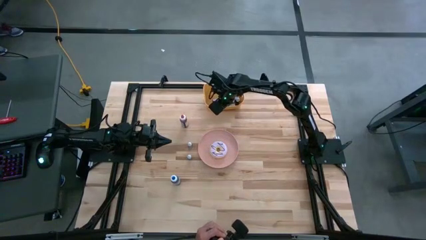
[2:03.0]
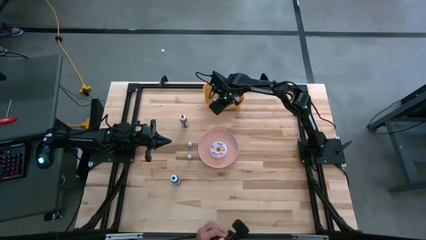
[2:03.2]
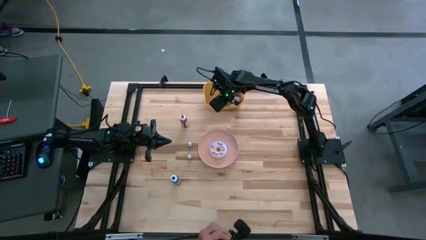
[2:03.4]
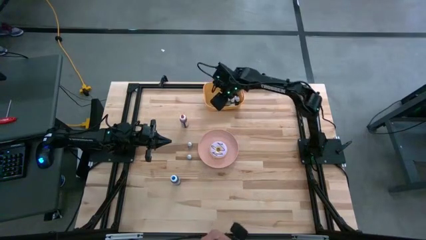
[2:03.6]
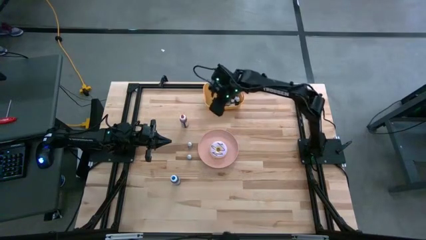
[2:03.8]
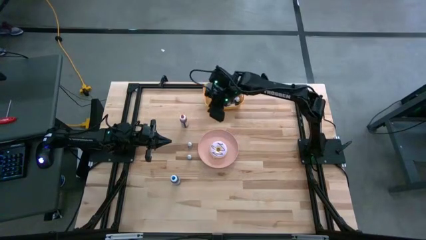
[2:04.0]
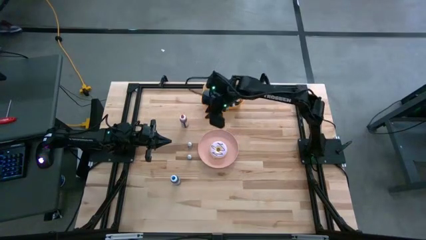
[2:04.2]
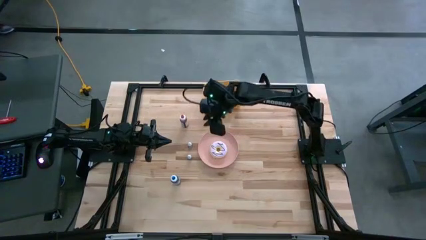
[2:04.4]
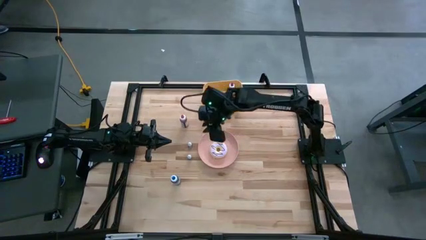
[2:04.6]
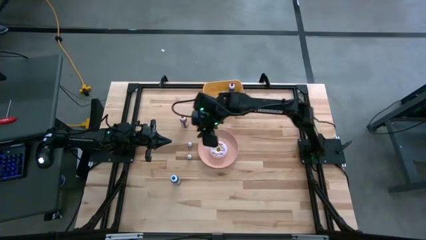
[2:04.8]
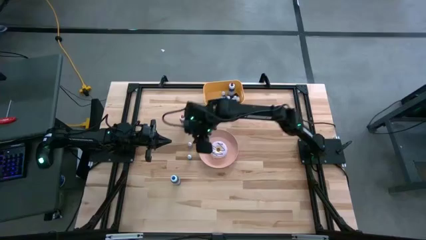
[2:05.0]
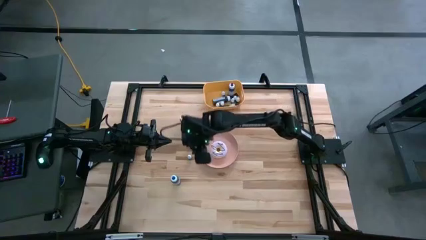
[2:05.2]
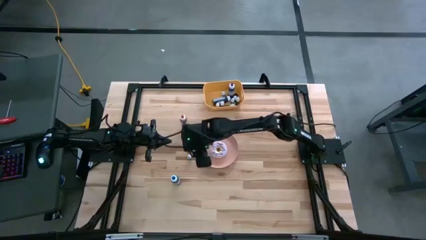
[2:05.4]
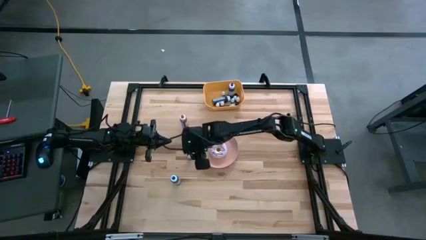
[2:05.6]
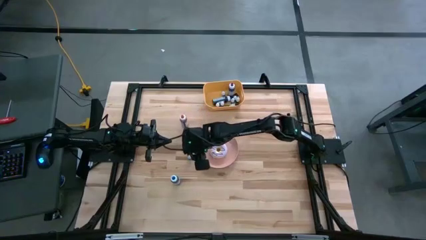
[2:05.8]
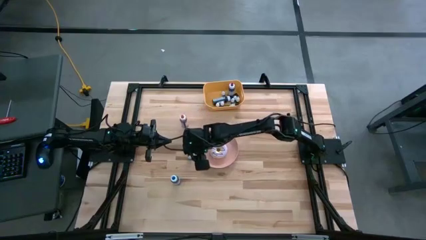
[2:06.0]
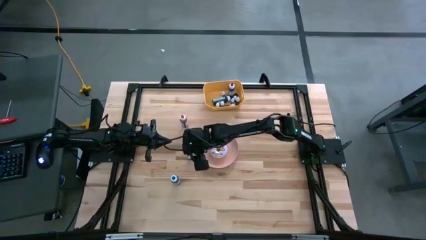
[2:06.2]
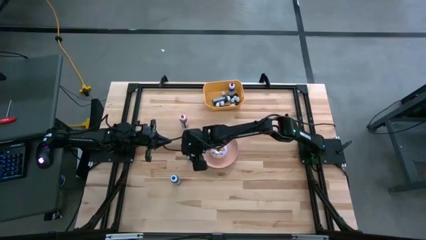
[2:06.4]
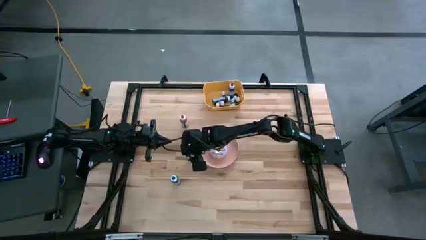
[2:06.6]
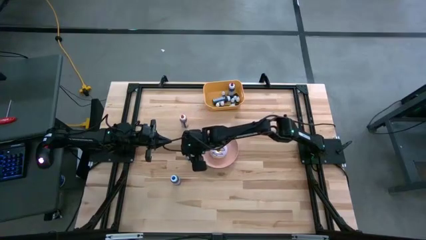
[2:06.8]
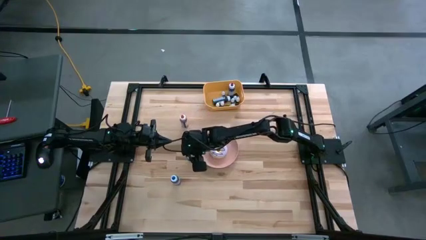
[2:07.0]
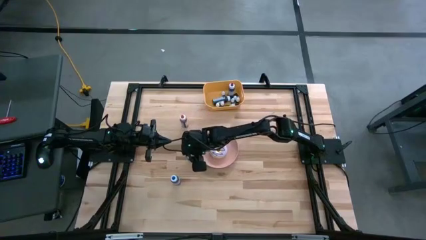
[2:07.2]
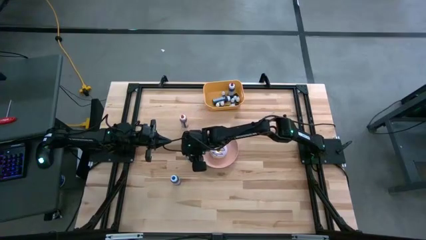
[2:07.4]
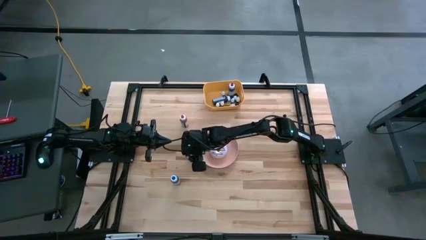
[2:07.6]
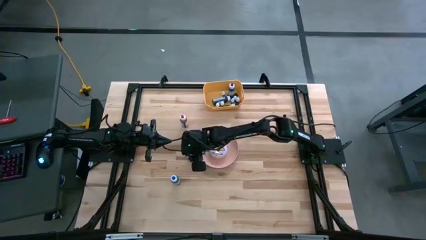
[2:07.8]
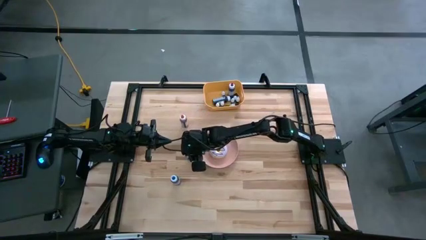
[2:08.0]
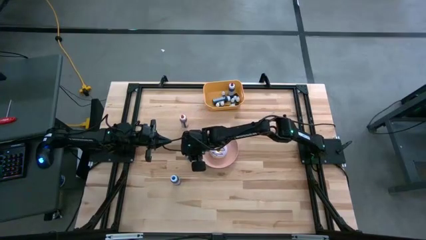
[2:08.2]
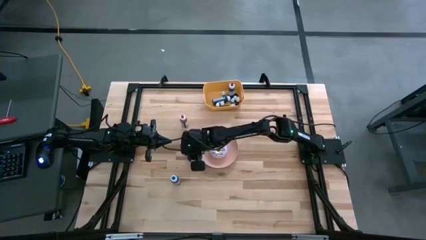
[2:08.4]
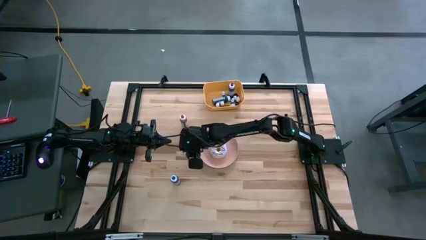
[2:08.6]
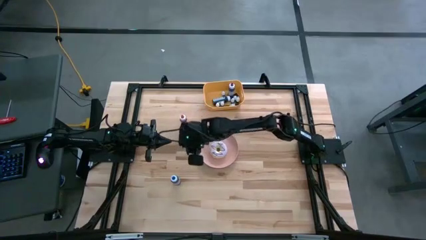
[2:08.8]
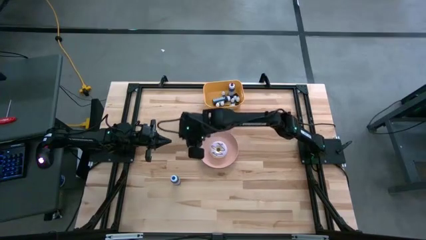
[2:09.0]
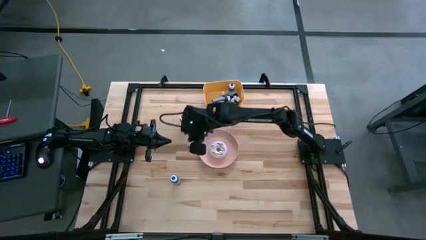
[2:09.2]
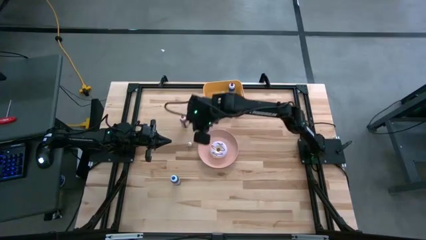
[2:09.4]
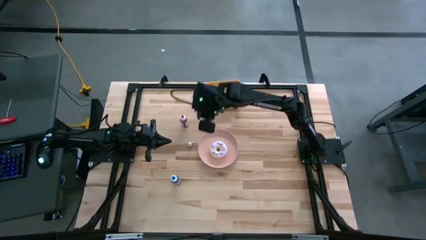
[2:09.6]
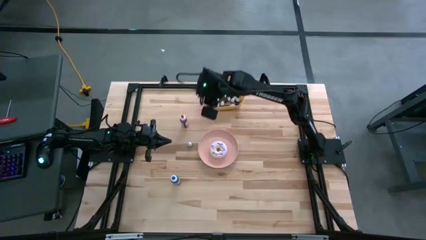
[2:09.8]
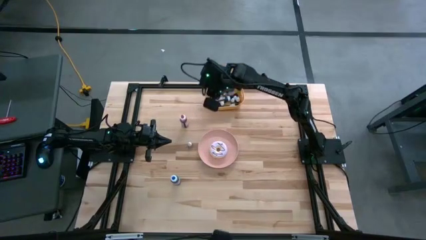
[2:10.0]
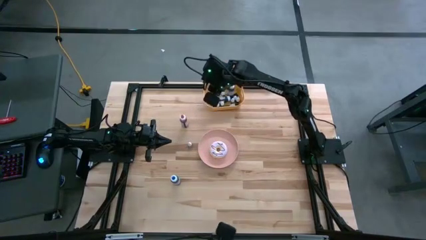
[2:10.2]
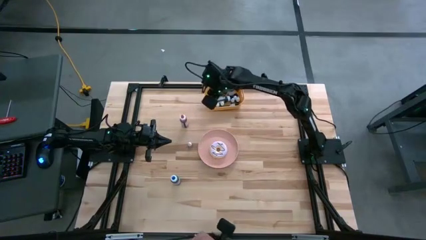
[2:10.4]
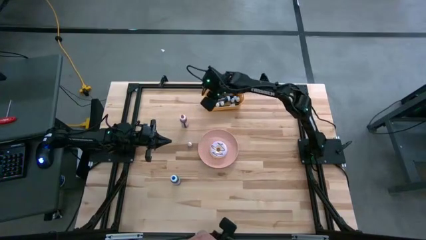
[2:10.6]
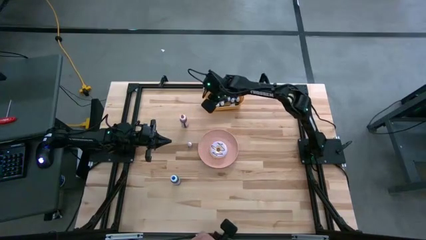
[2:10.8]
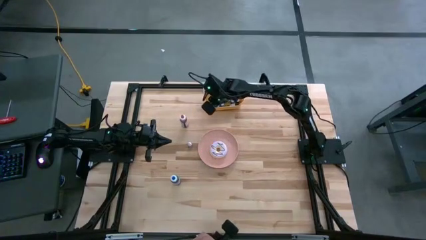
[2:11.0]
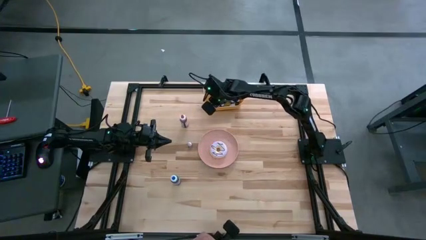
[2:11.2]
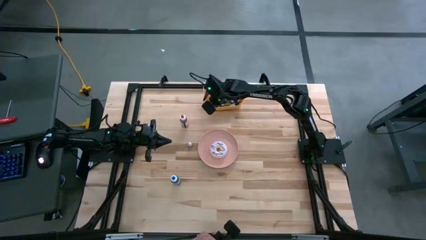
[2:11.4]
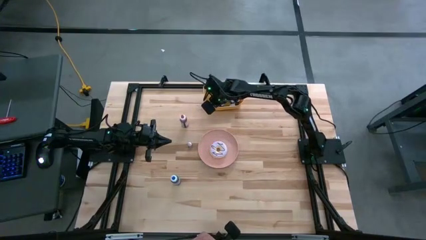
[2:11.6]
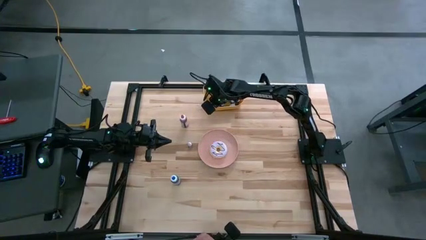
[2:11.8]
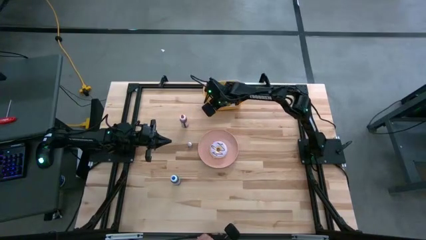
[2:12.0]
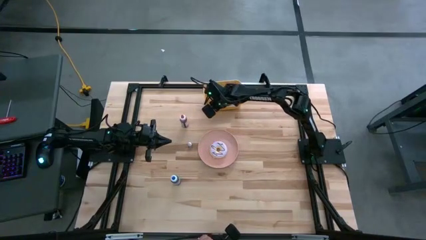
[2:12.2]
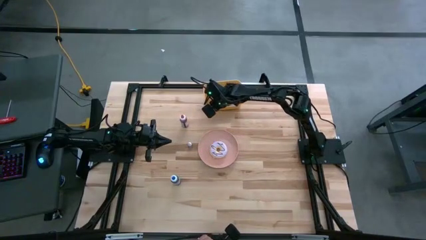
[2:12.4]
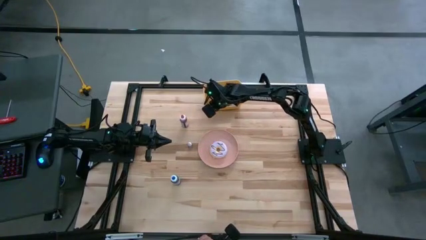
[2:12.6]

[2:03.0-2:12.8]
Task: Pick & Place food coloring
Put the small blue food coloring bottle into the orange bin

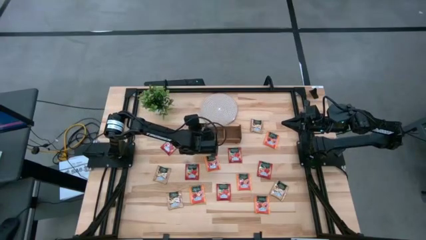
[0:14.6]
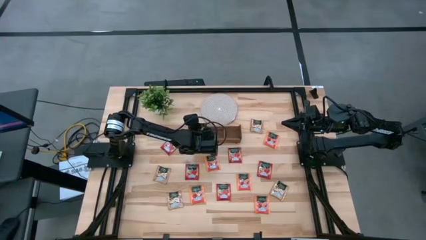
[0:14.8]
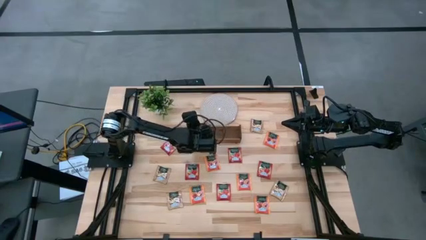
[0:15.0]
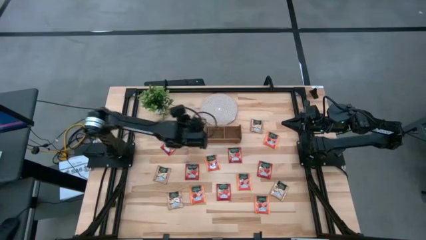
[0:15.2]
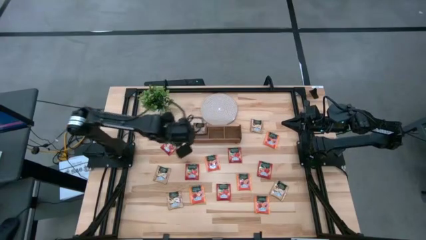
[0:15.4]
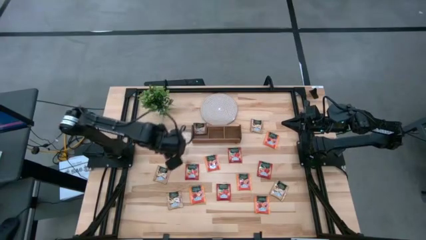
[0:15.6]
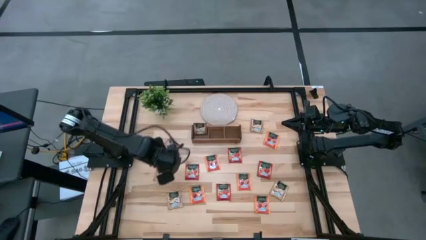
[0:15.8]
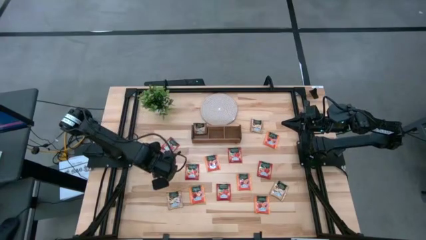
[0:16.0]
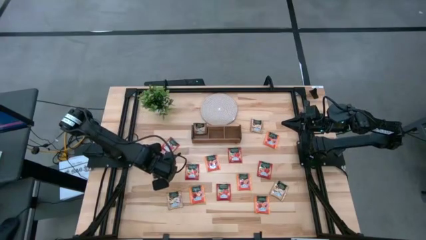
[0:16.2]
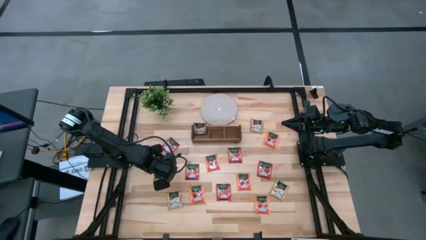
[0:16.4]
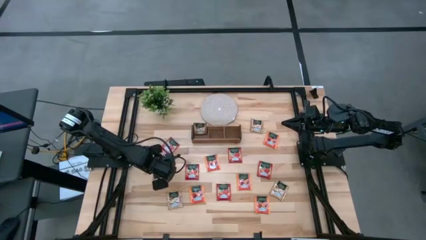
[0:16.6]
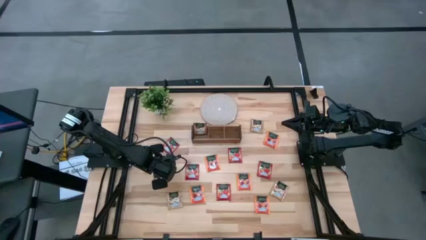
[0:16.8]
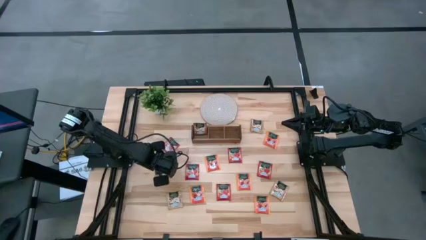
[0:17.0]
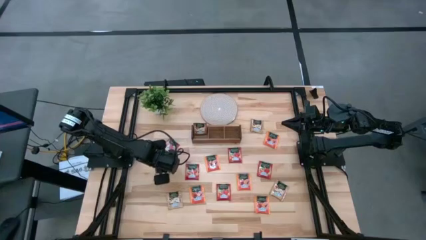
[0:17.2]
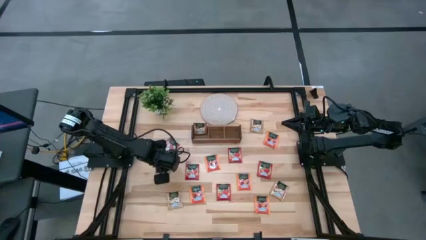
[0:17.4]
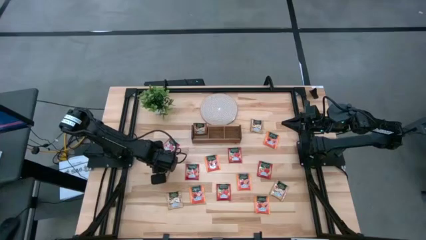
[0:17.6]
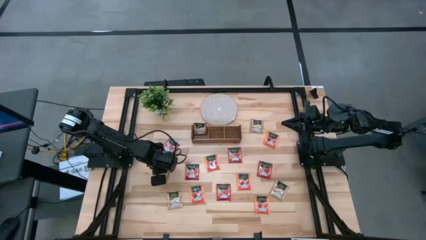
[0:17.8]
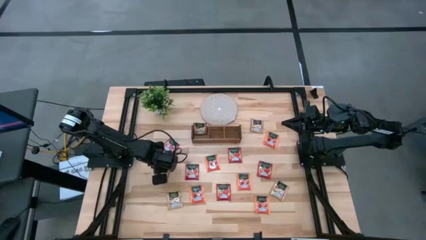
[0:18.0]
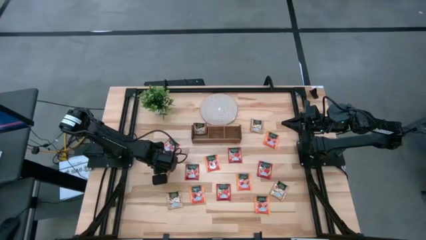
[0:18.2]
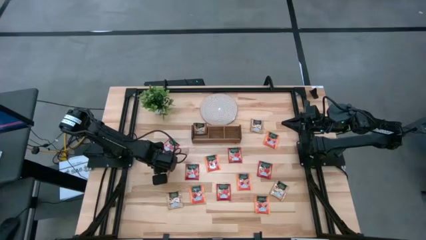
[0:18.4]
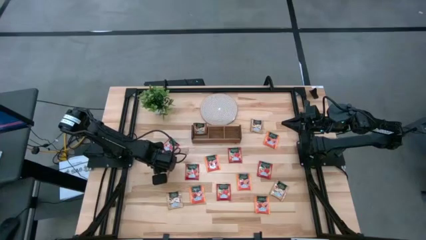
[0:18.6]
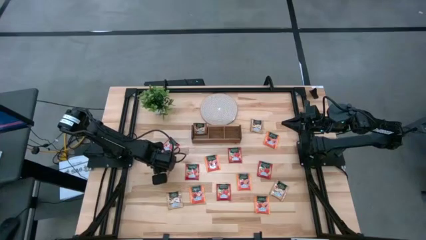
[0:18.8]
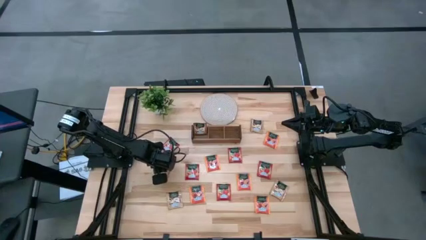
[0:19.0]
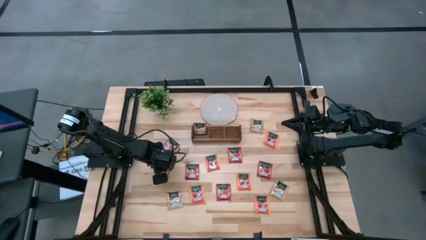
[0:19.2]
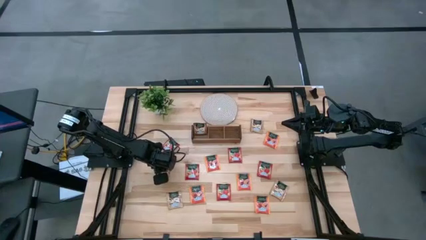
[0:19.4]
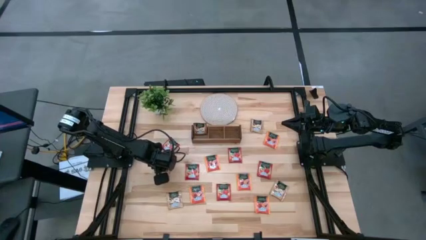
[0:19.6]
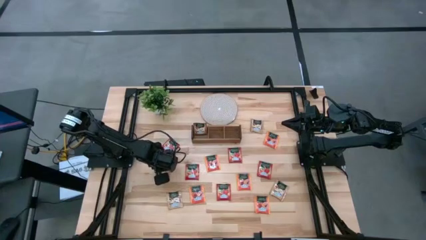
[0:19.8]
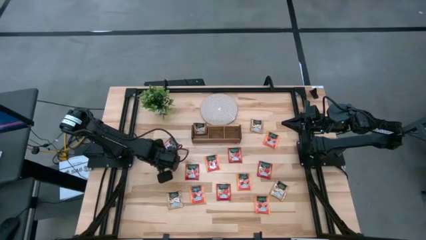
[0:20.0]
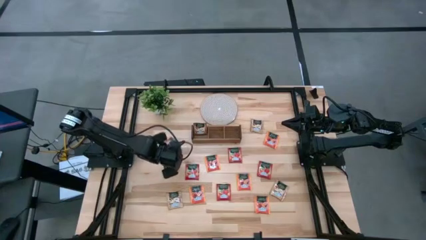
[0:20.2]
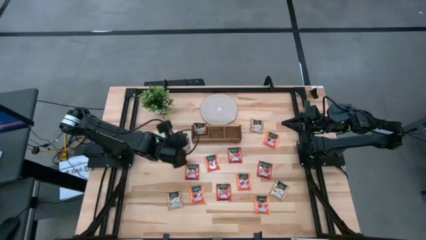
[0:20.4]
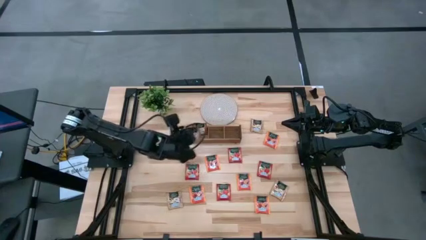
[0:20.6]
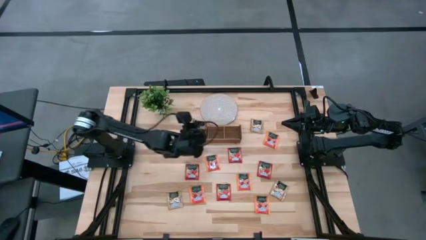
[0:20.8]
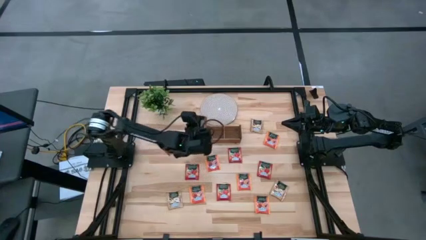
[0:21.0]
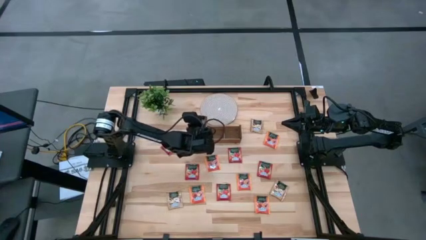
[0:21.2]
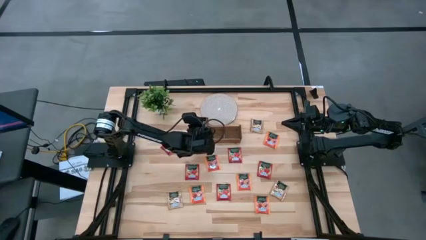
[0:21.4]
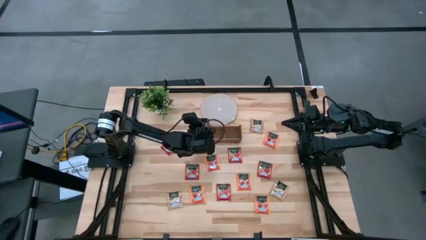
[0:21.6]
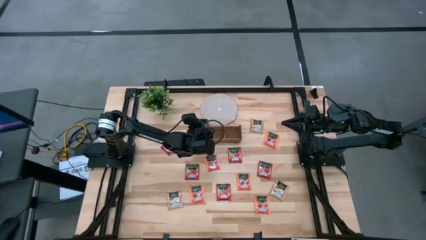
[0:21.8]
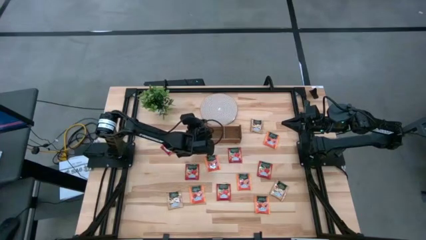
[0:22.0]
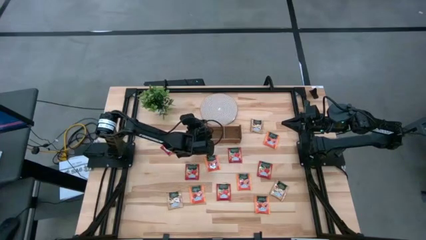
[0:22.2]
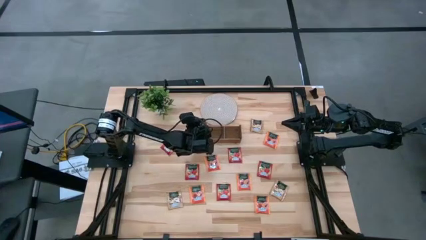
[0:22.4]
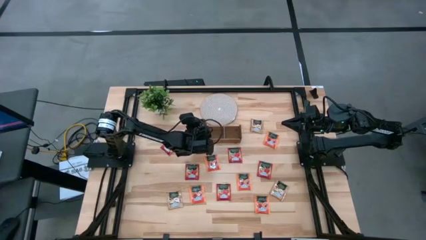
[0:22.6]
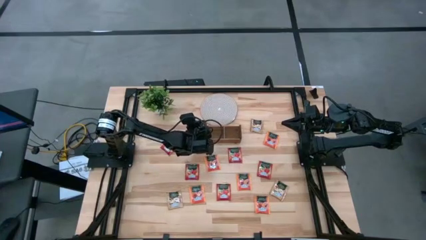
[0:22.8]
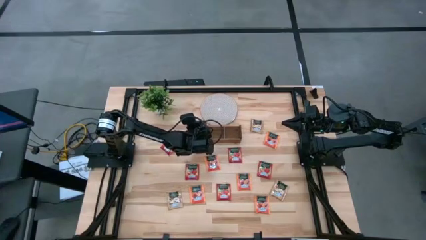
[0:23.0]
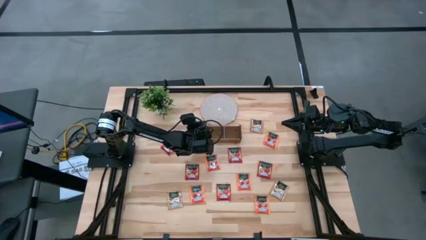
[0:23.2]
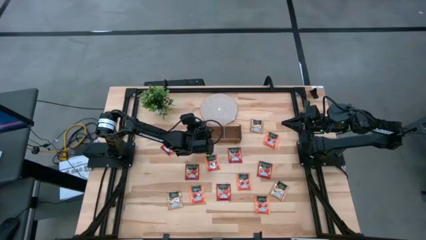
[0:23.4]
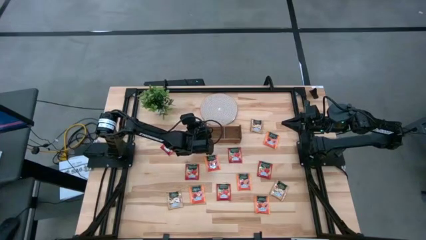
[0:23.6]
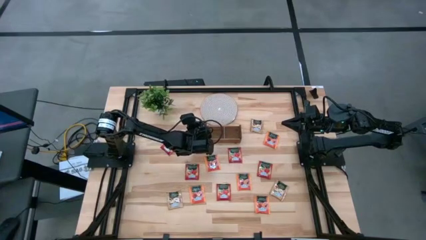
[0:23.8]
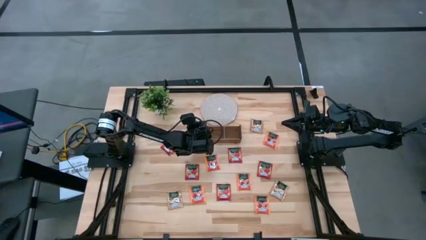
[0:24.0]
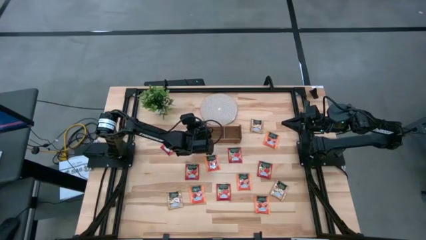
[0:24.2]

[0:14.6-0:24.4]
Task: Pick & Place Tea
Put the brown tea bag into the left of the wooden organizer
